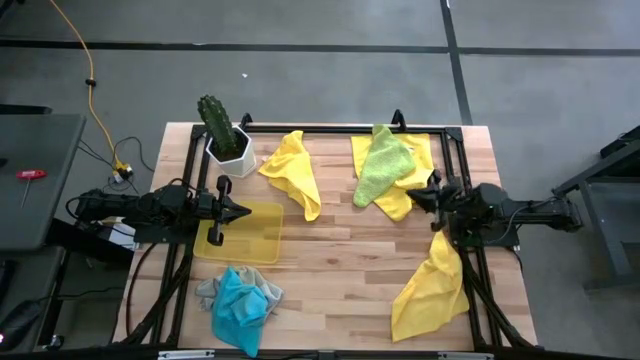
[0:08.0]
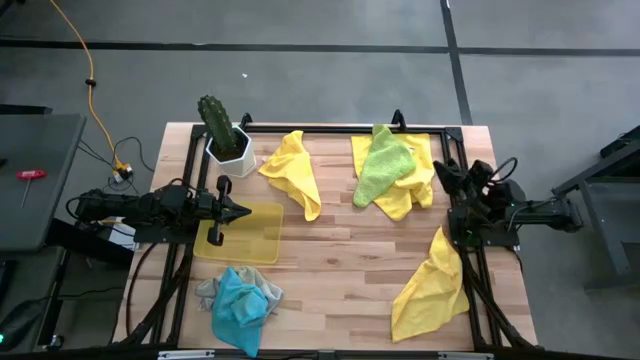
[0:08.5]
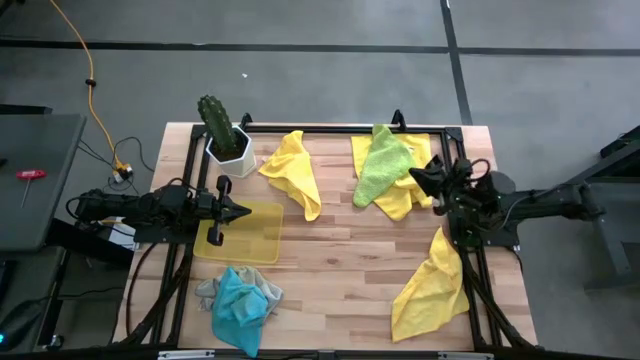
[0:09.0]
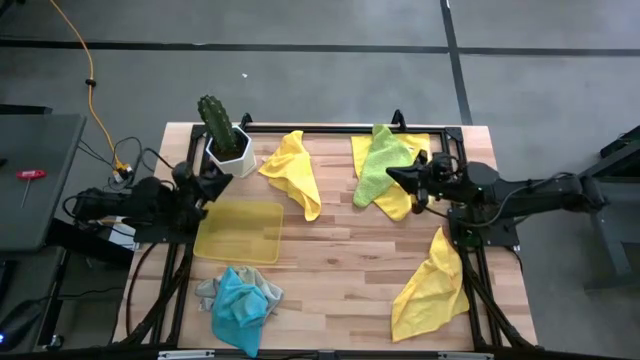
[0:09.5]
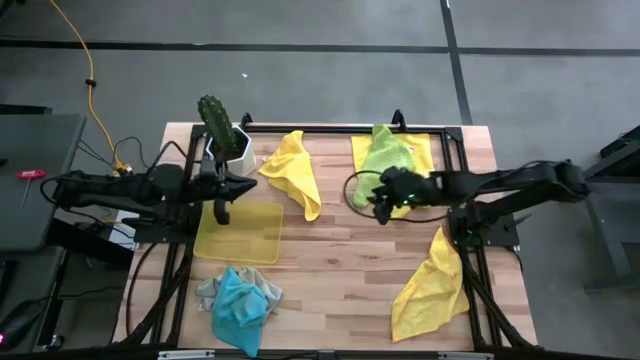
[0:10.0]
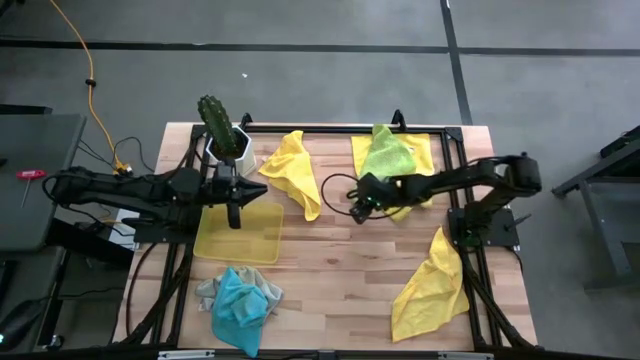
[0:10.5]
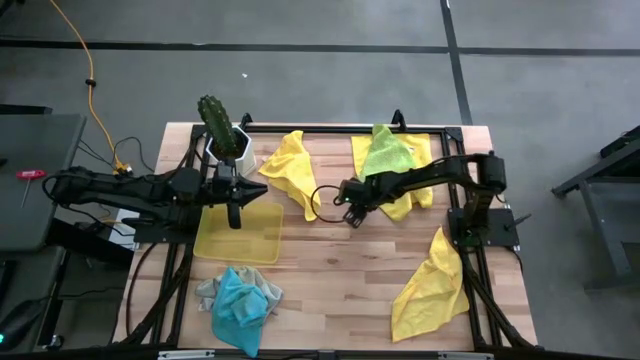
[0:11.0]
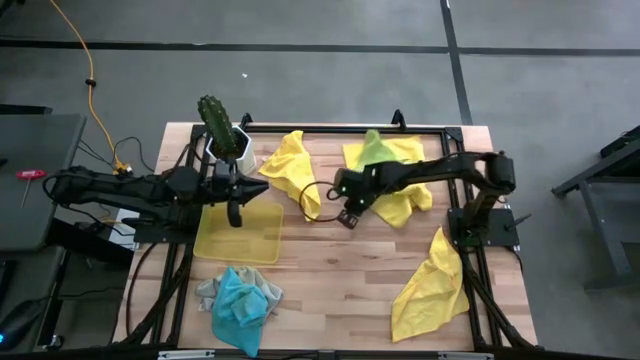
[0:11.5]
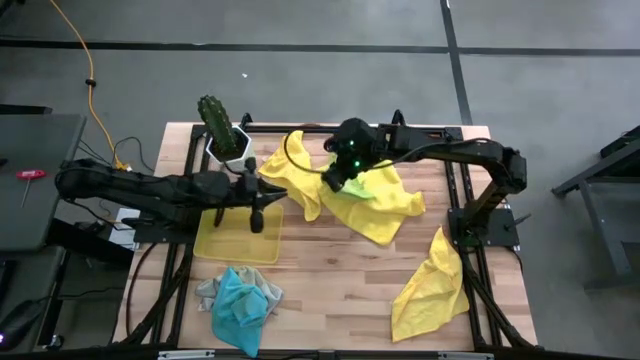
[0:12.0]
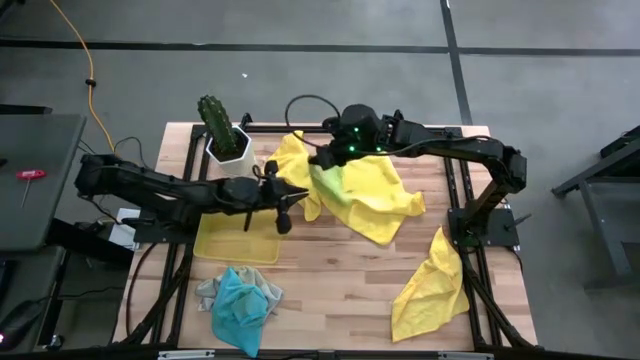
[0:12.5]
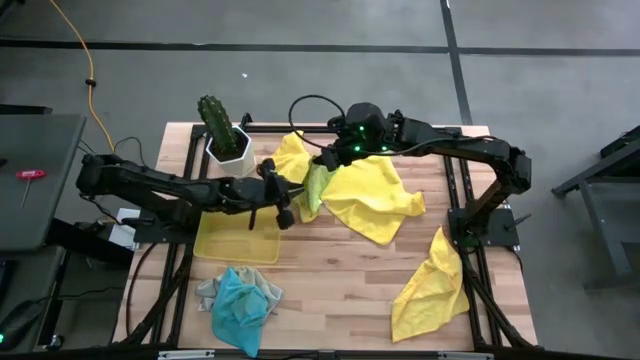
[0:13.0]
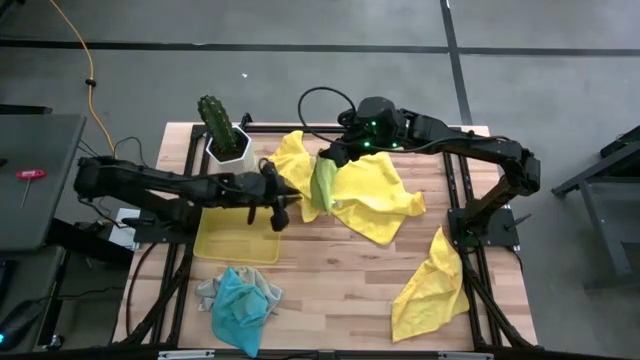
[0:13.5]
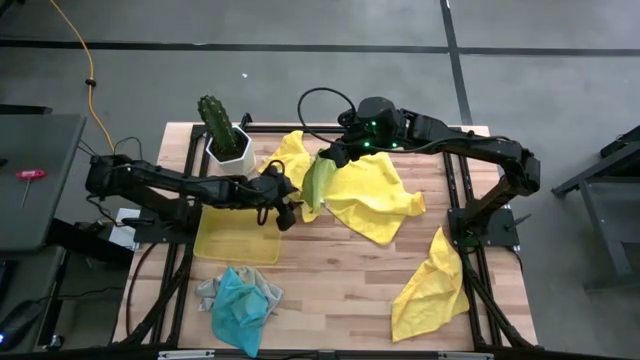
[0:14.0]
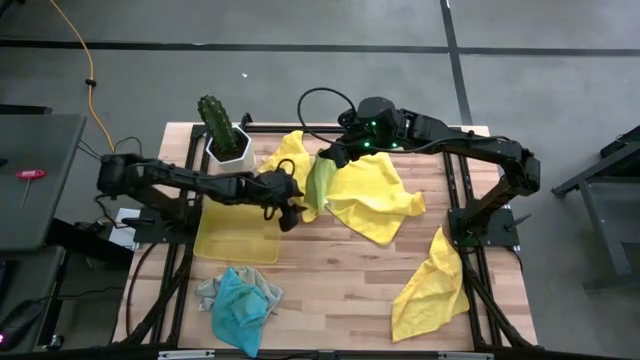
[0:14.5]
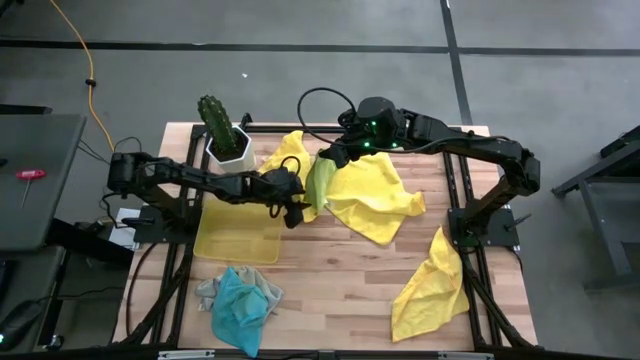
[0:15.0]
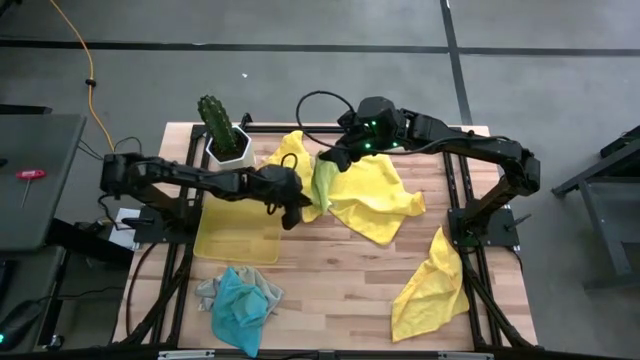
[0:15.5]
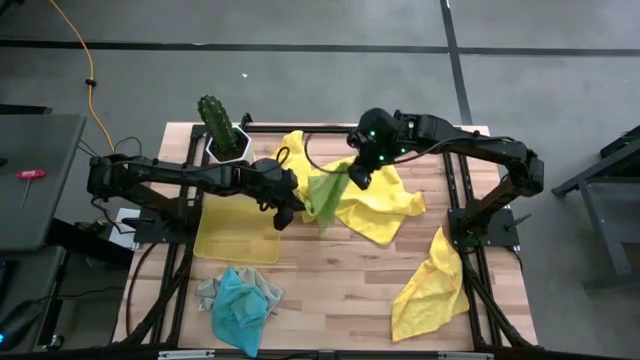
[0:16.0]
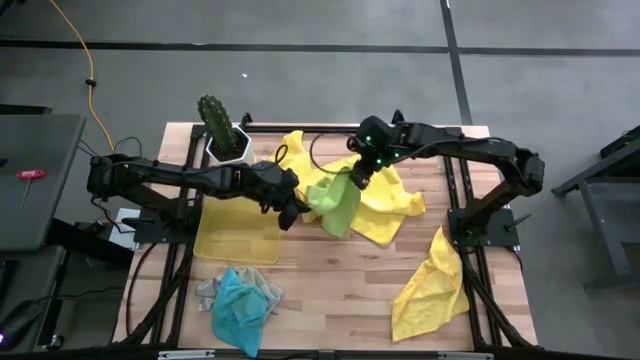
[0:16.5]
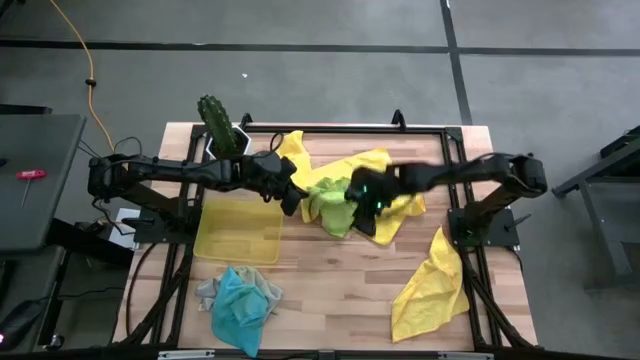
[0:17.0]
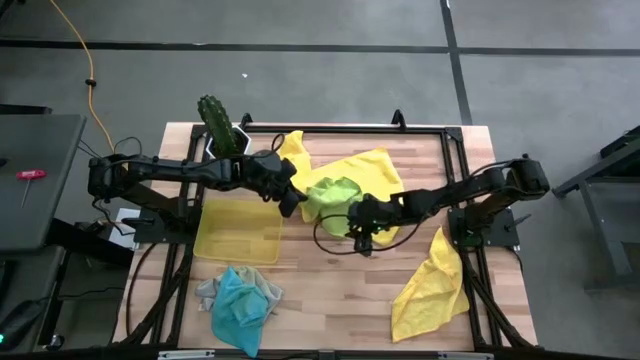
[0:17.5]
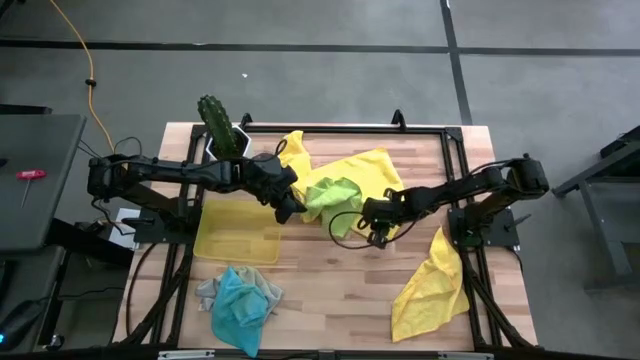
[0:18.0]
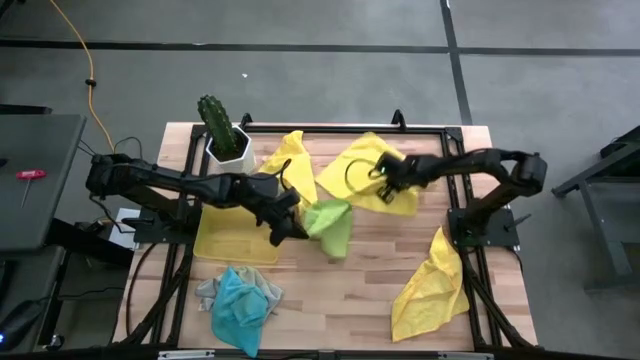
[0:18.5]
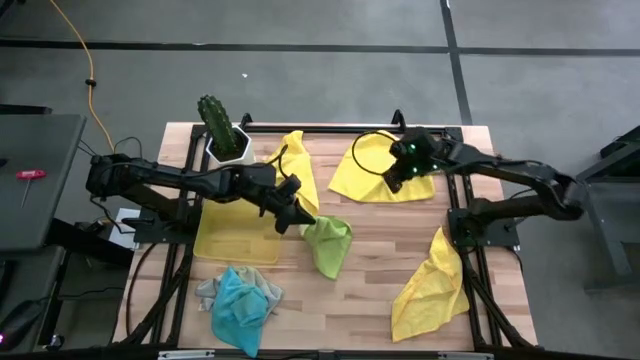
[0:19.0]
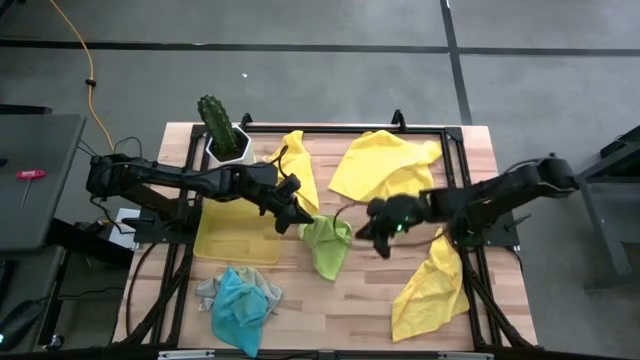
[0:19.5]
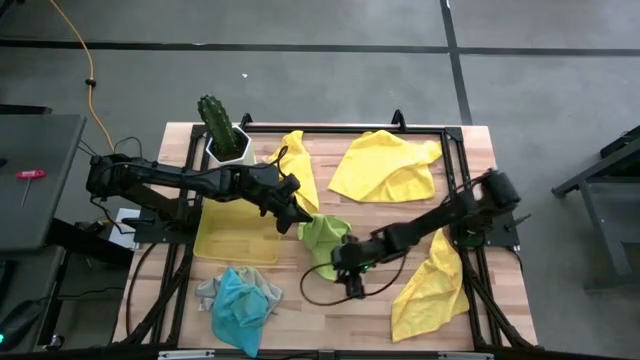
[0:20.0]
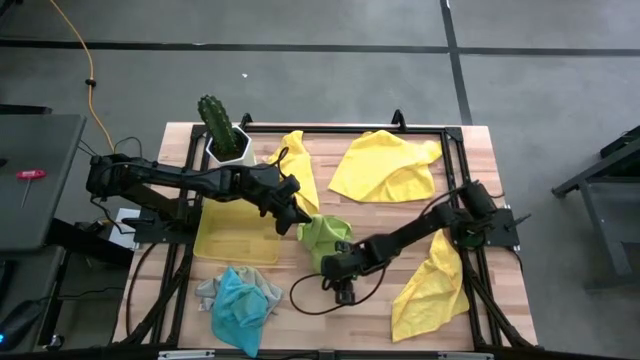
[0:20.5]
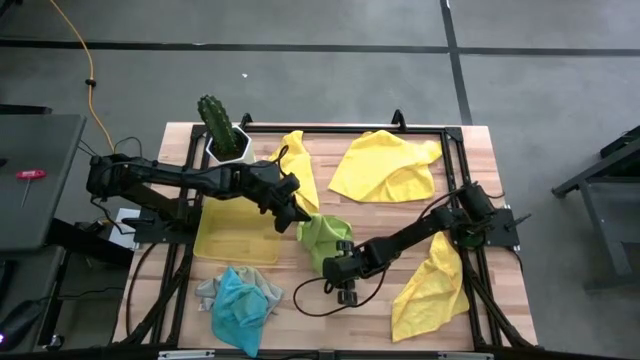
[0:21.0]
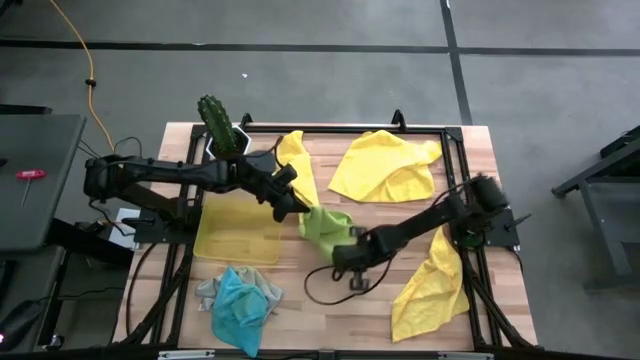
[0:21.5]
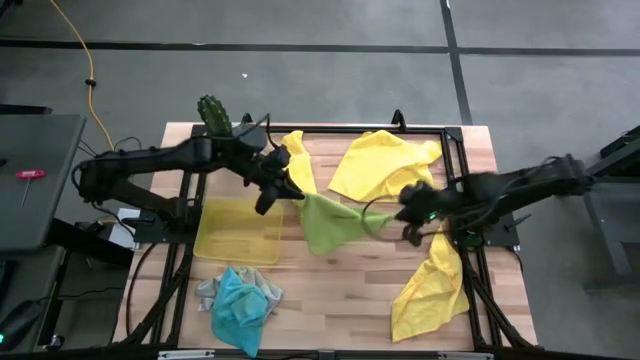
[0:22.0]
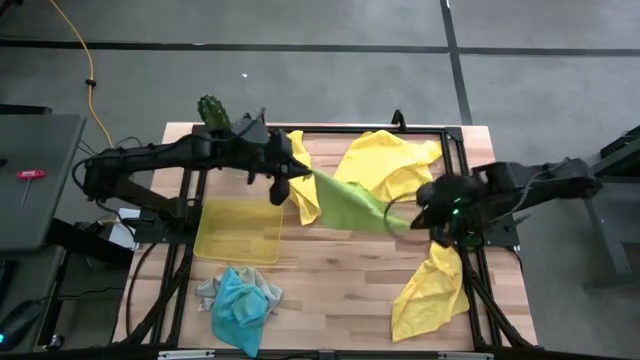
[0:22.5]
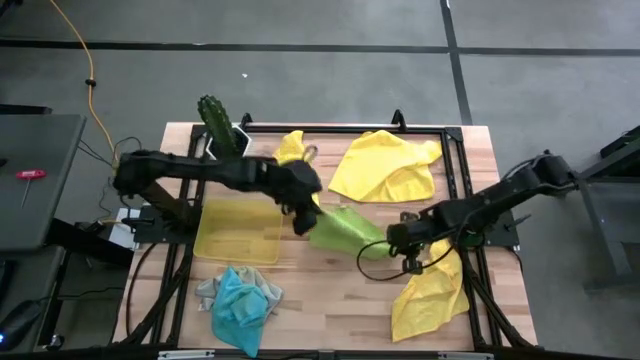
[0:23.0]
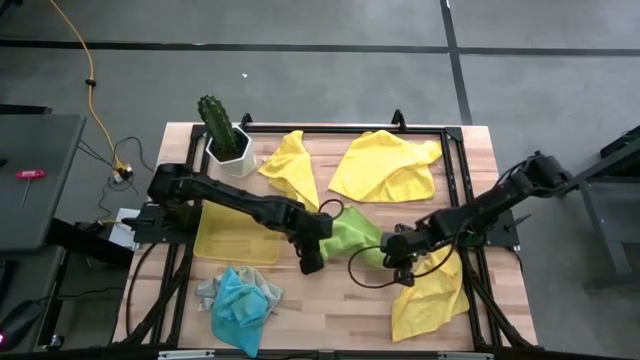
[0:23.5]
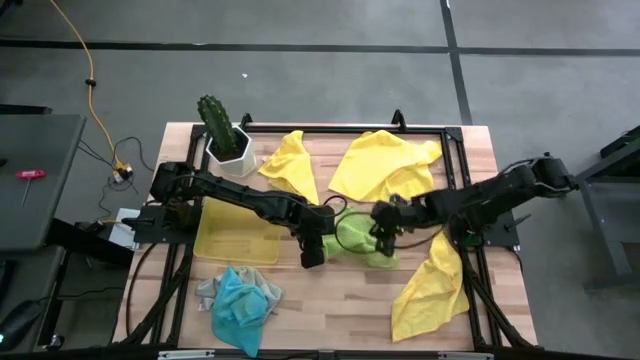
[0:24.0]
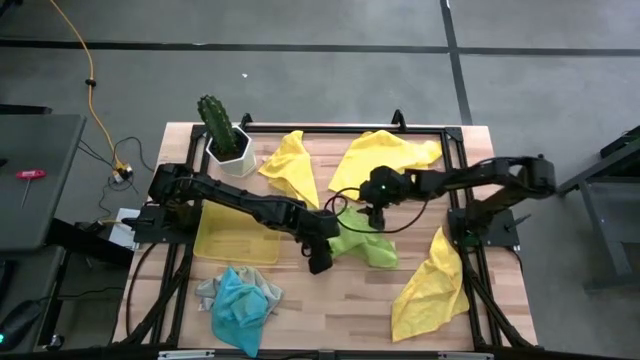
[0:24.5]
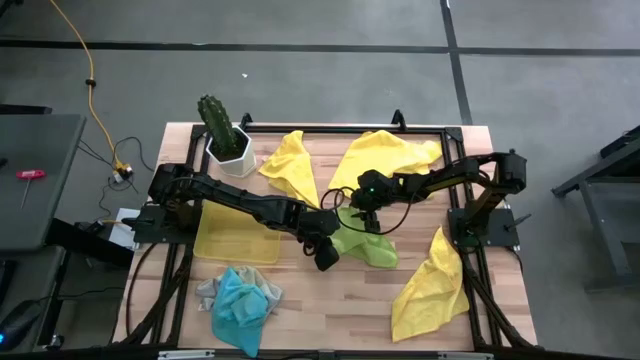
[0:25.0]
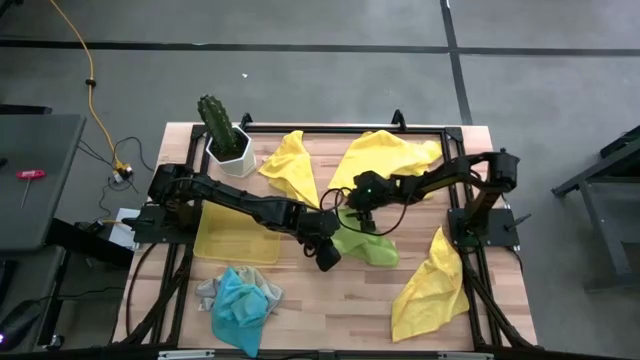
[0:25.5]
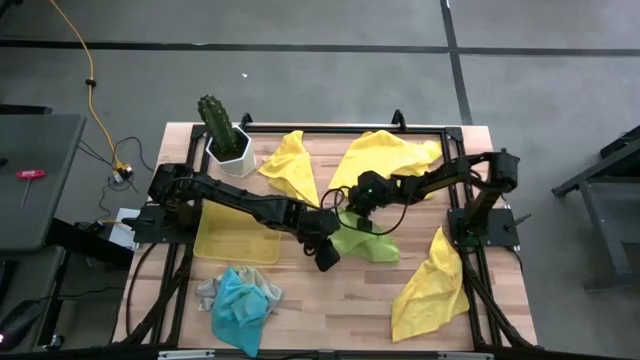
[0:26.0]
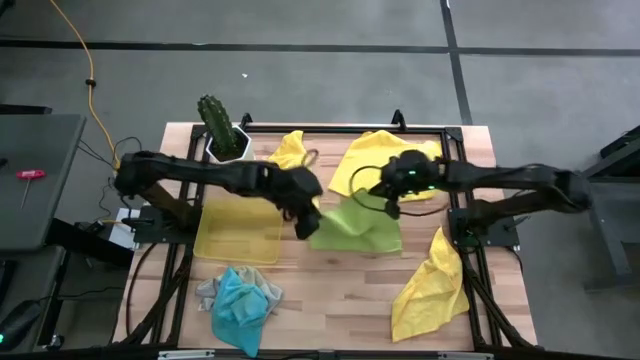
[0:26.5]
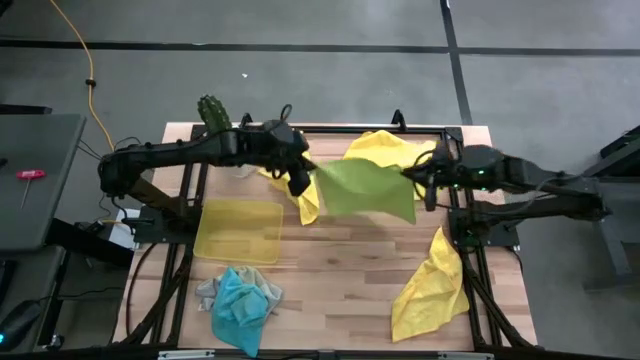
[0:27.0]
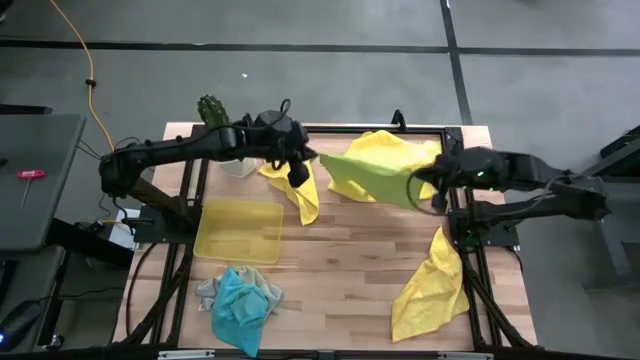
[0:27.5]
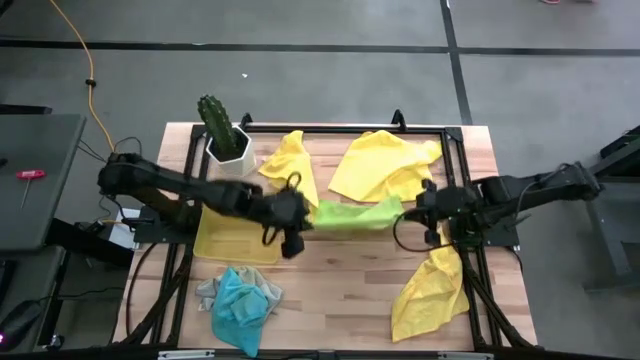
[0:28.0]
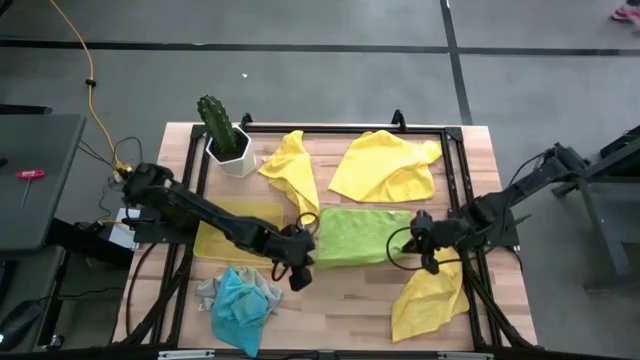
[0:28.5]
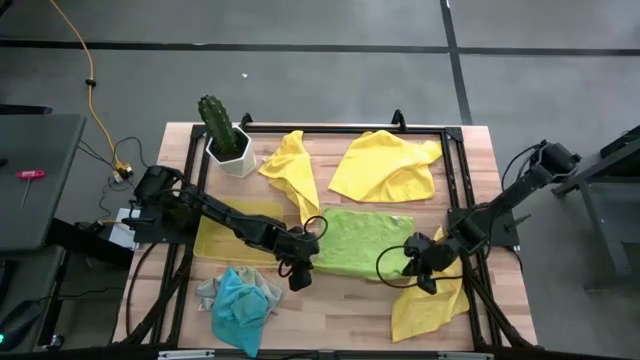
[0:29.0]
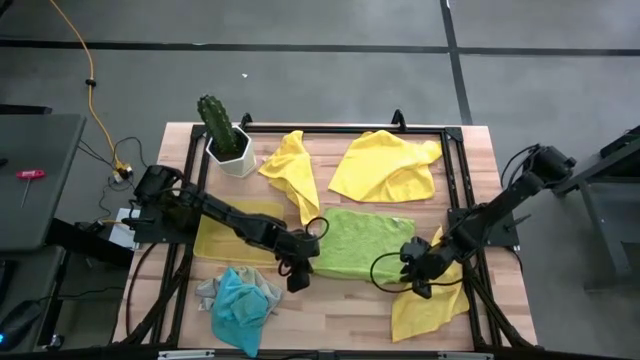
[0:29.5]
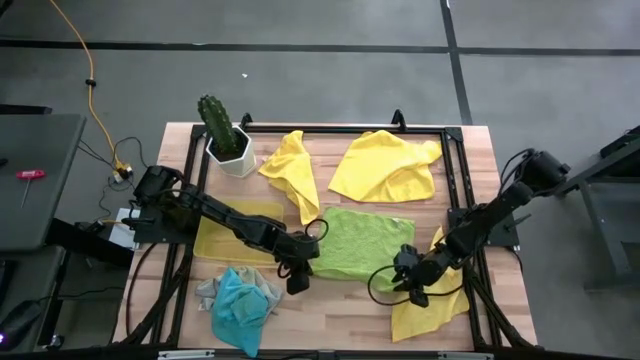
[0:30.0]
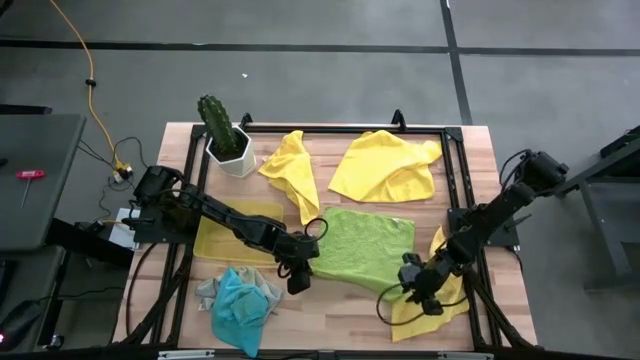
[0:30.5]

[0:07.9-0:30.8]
Task: Fold microfiber towels
Fold the green microfiber towel
